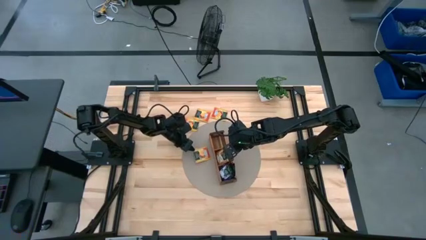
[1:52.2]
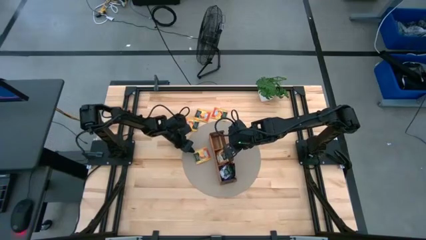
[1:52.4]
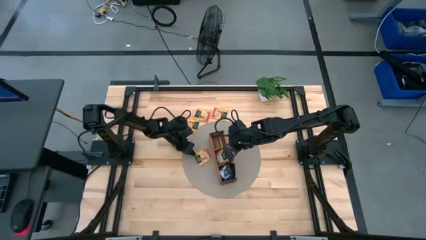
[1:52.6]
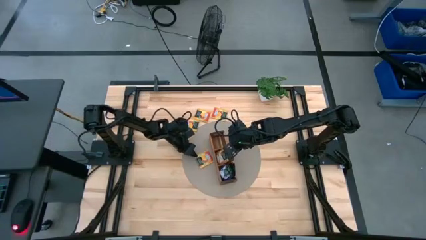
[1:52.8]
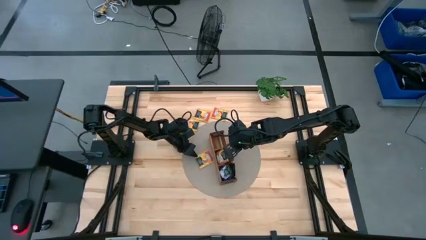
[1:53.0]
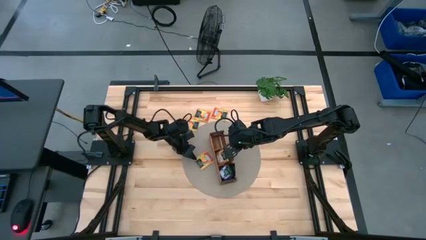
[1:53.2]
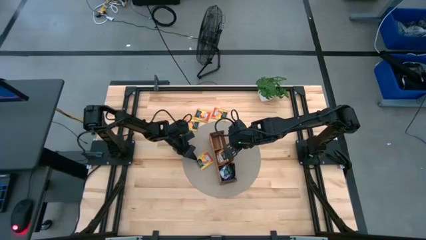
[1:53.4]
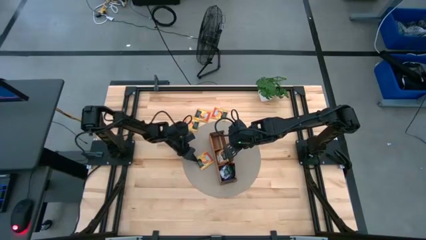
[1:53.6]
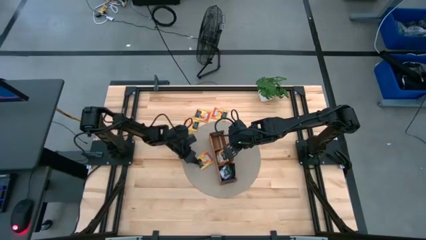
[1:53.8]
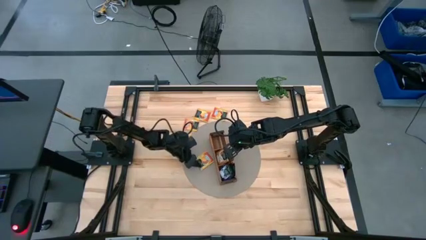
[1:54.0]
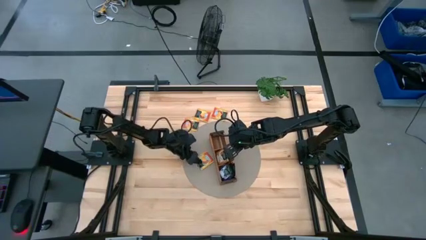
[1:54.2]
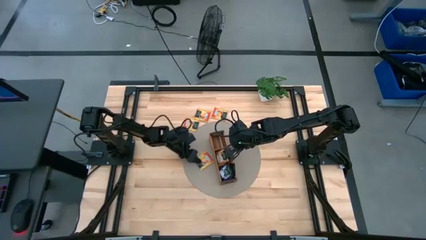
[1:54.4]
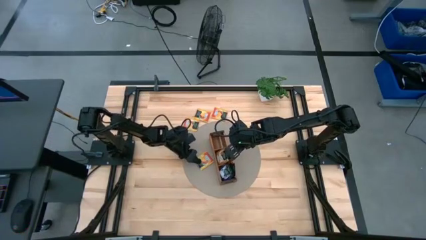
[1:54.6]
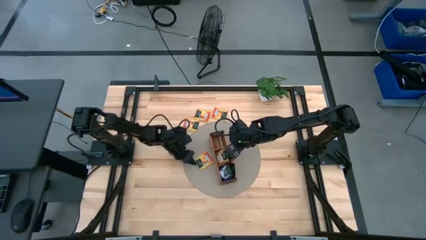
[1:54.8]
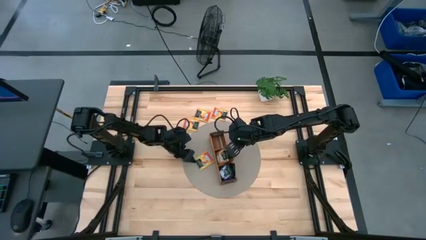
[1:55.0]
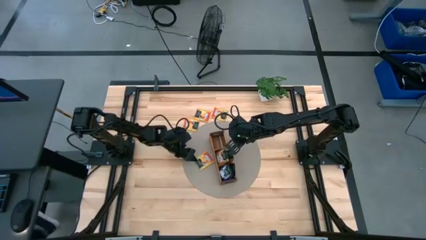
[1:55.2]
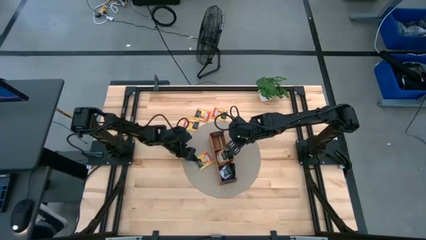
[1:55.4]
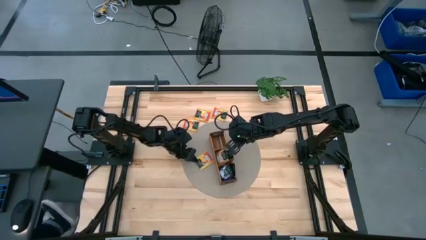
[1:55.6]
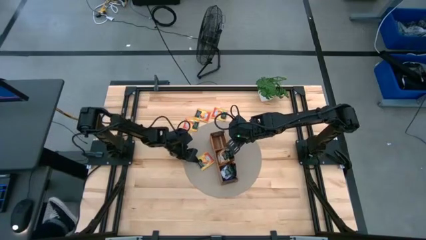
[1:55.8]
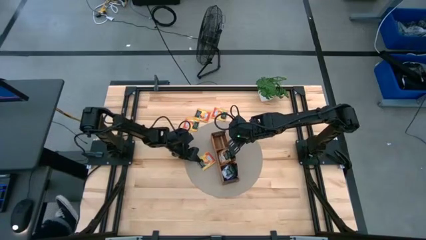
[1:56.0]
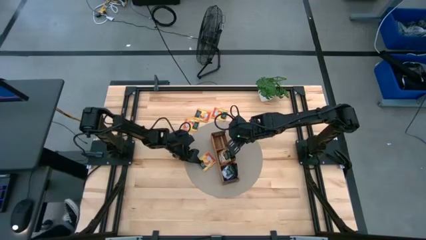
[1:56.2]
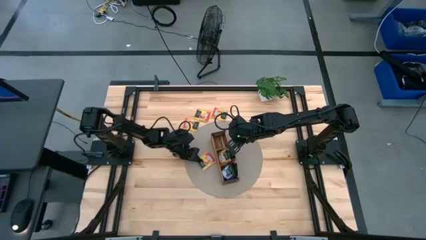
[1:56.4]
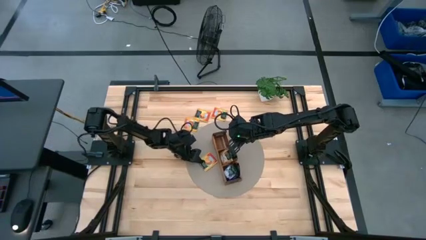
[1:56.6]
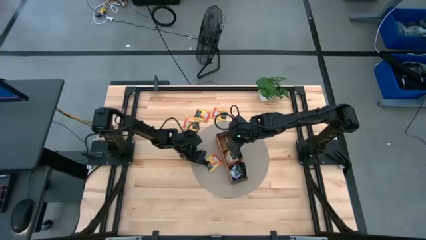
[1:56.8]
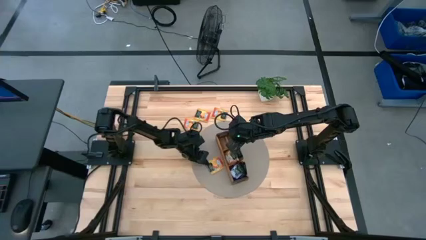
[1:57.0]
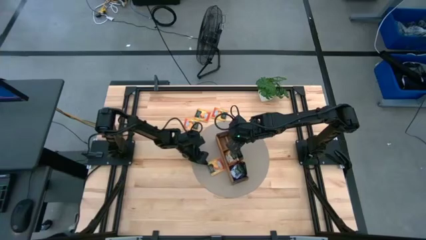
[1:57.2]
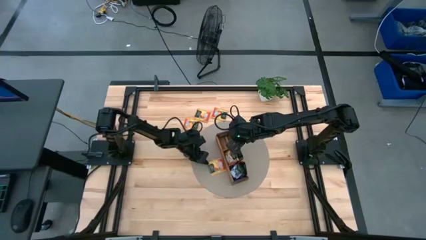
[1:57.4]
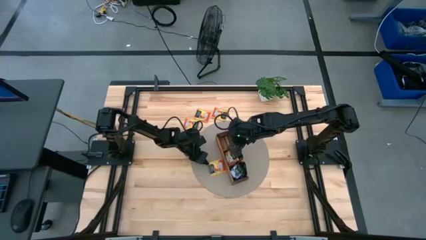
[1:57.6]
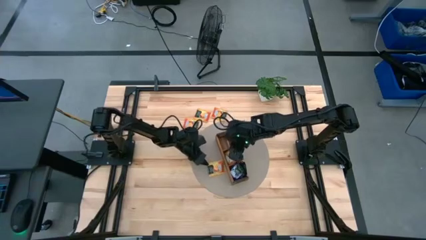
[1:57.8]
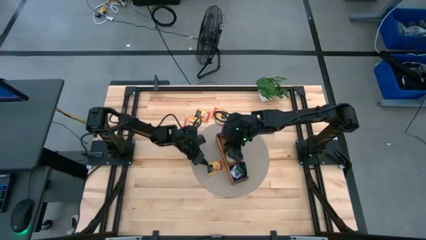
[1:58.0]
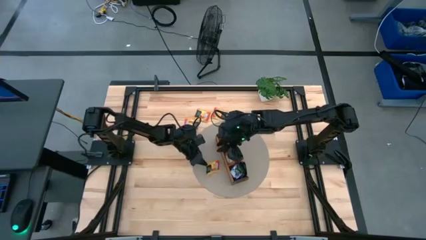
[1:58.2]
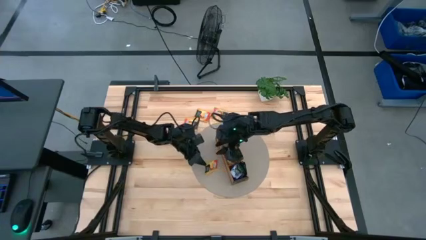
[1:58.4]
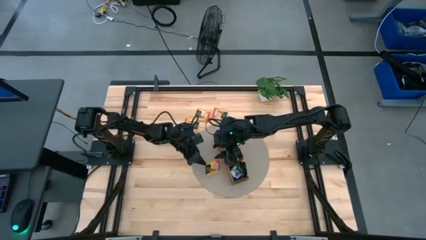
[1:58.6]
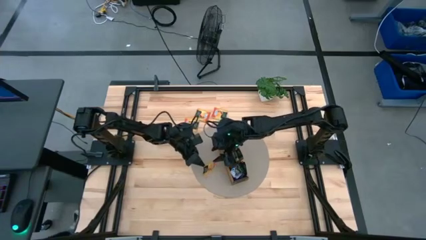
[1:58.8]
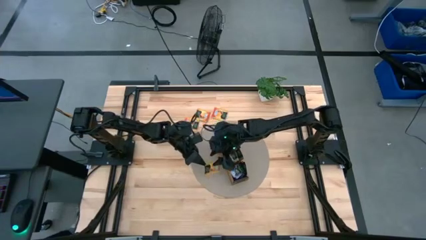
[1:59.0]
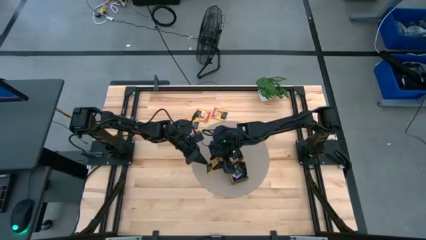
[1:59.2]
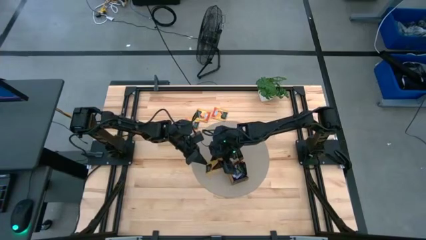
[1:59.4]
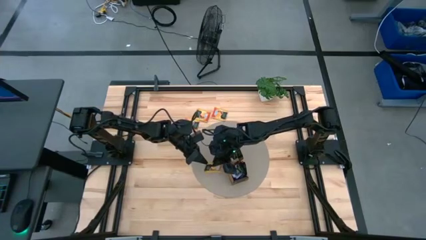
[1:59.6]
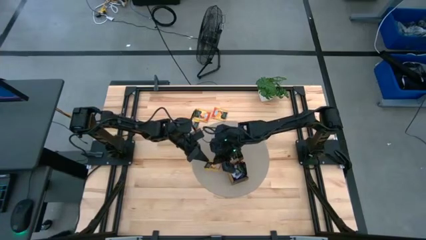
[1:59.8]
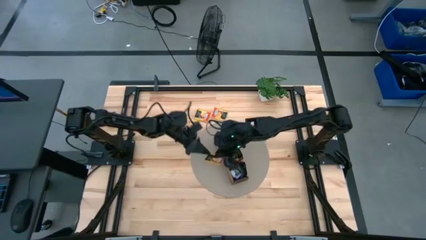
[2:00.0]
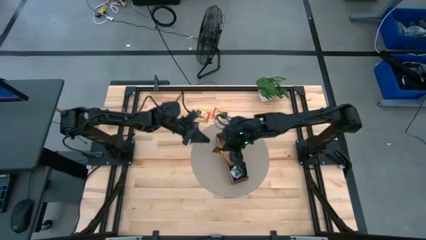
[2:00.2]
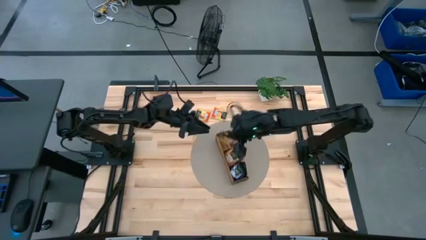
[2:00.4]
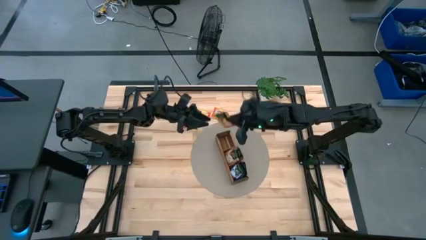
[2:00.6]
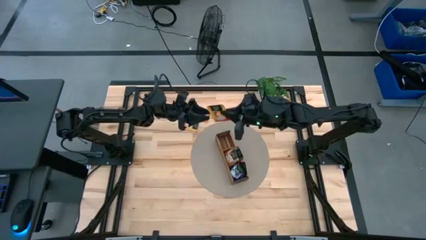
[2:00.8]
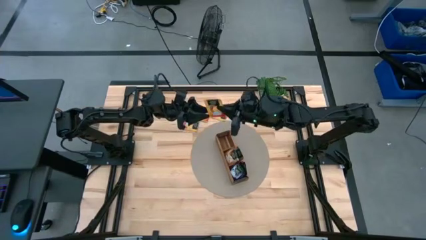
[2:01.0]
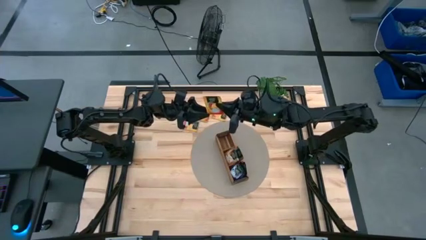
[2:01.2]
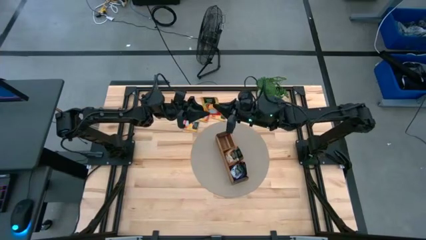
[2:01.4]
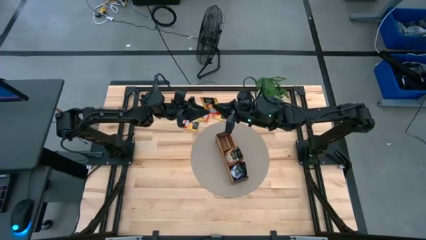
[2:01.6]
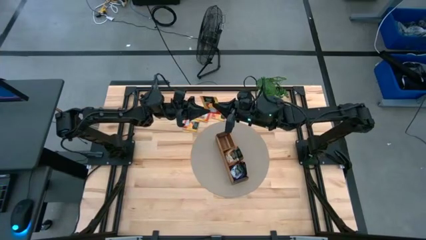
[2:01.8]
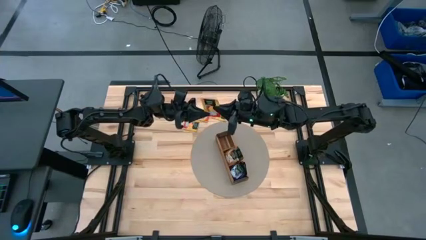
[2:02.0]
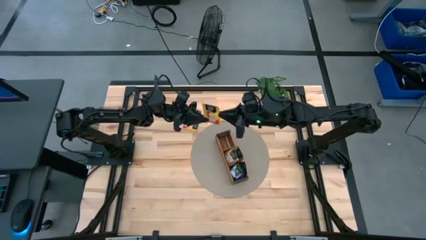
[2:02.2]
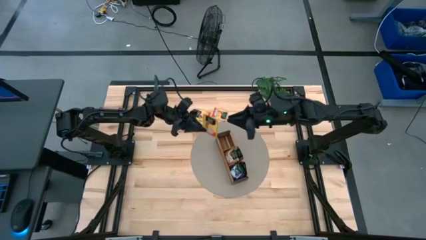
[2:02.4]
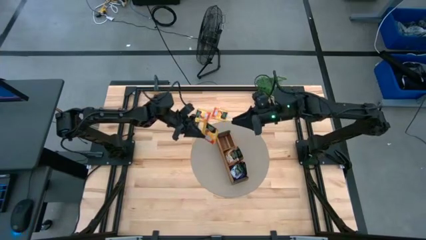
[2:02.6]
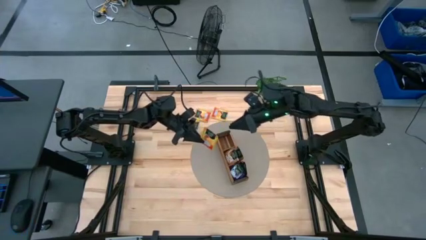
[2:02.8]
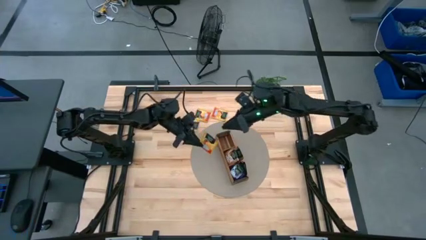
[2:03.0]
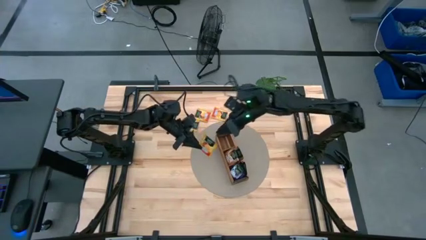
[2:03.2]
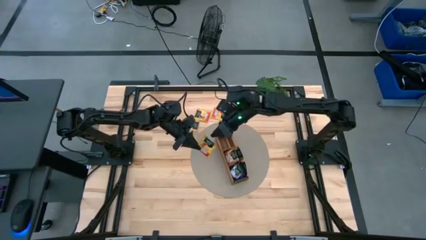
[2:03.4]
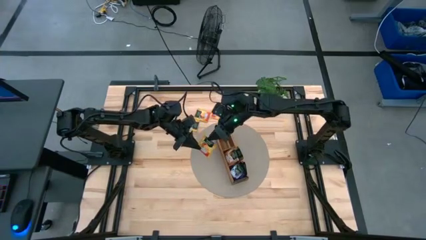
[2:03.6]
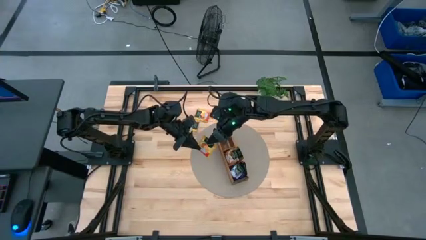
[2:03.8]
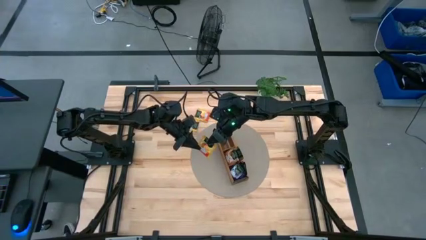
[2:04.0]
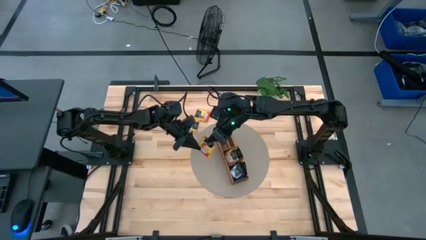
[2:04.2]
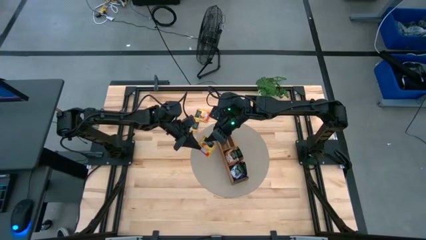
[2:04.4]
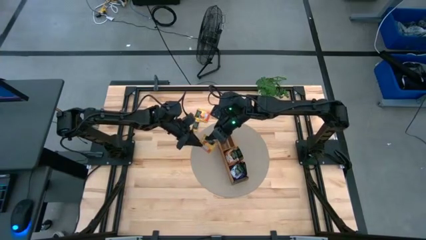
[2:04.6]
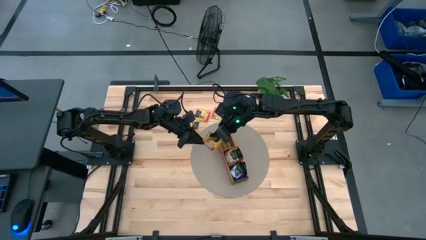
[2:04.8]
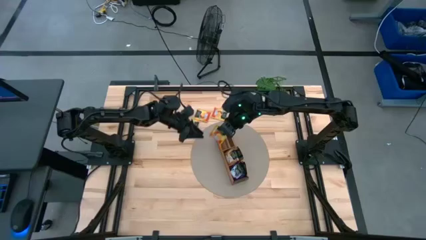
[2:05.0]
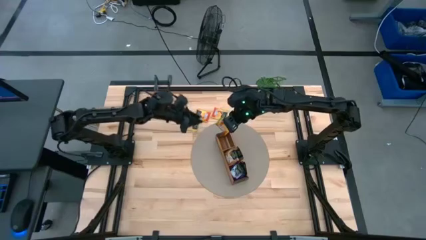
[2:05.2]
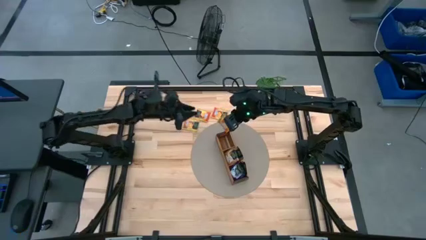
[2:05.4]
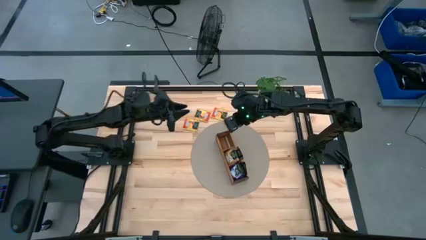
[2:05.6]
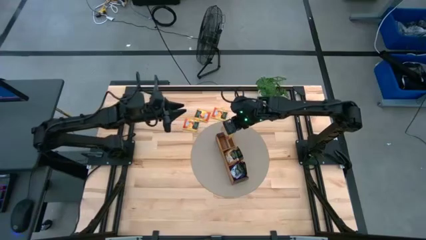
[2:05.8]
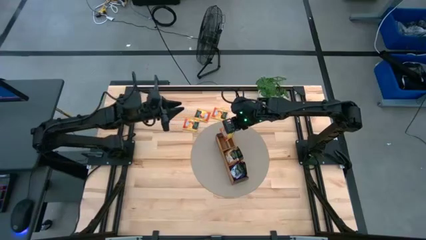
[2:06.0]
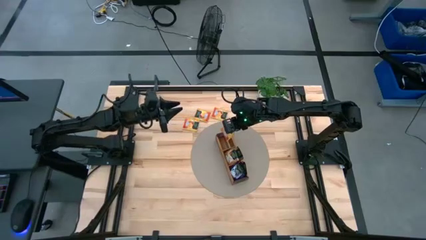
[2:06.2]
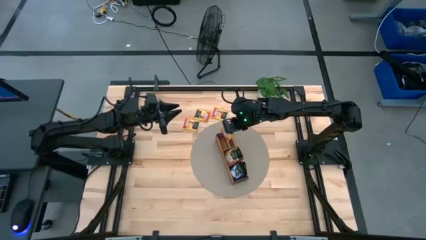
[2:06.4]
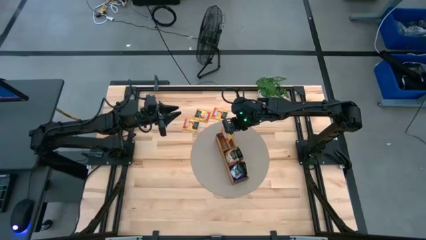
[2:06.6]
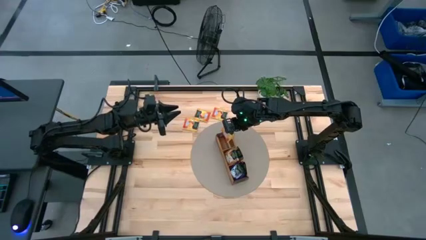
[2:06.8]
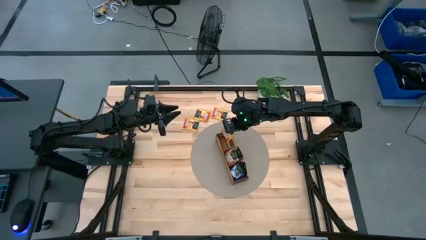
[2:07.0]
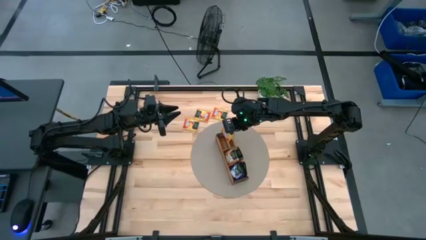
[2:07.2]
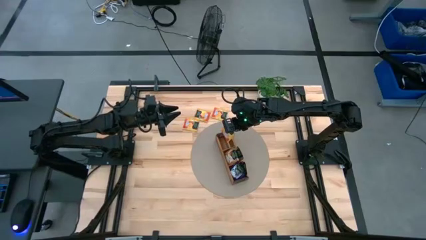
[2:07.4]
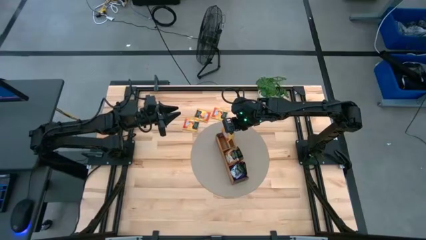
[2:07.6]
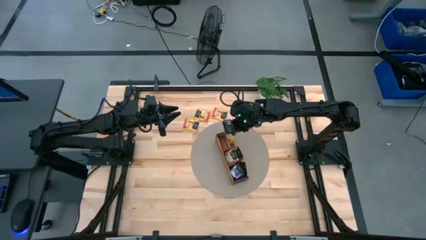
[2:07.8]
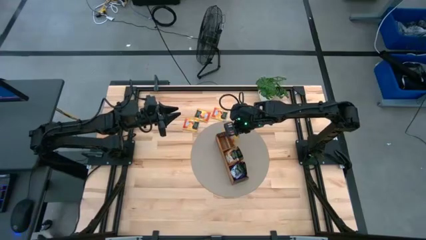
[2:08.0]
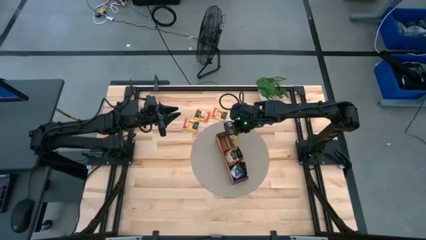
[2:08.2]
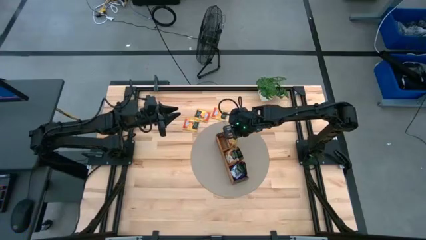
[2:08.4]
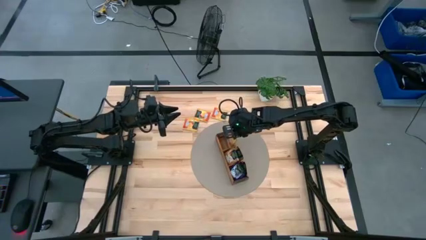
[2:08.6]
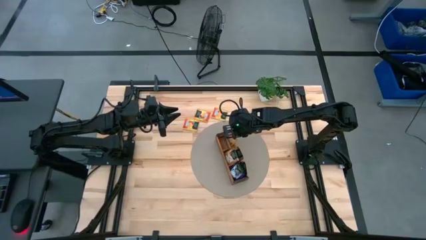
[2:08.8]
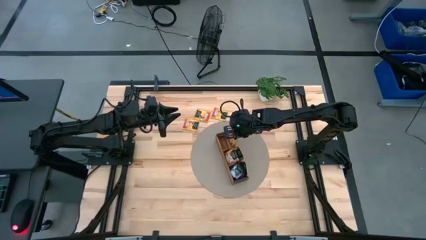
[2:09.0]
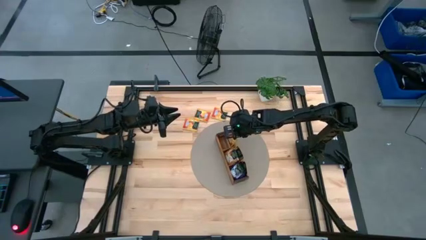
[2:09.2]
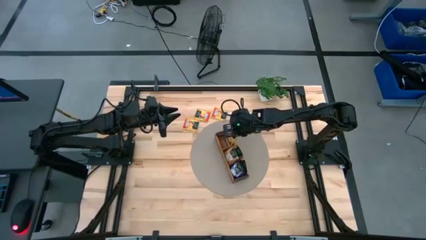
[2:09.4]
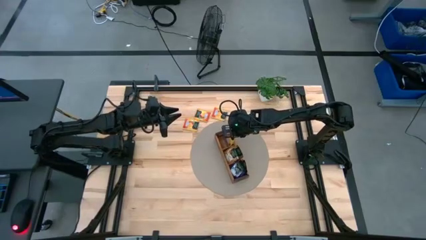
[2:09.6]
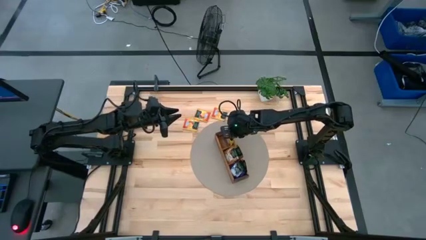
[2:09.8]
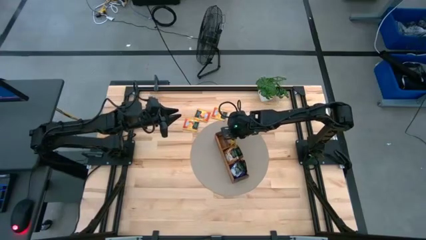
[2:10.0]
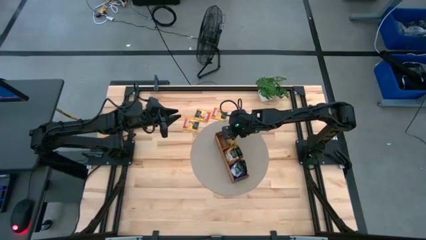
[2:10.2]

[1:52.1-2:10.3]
Task: Pick & Place Tea
Put the orange tea bag into the left section of the wooden organizer
